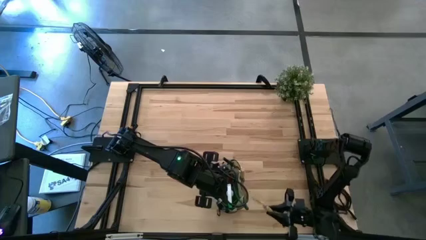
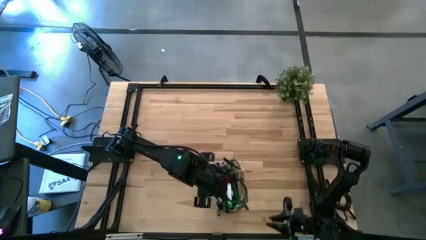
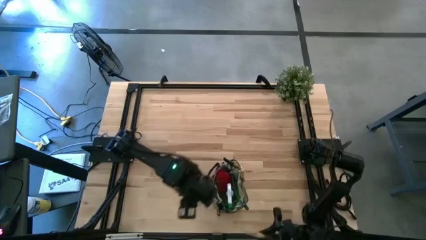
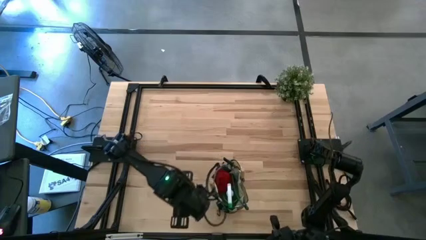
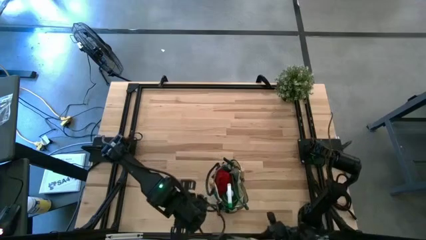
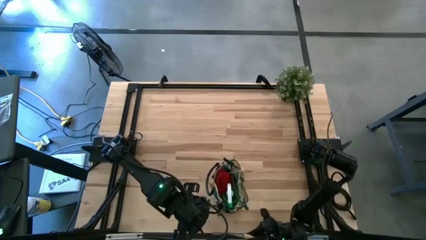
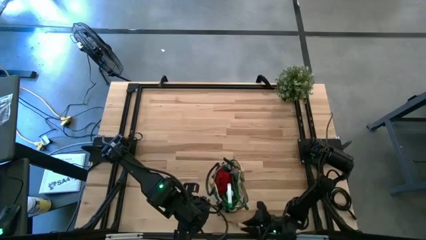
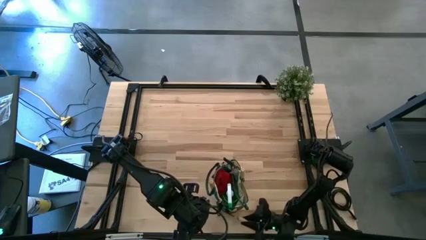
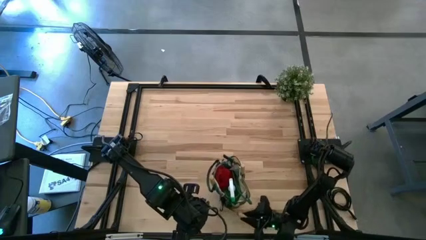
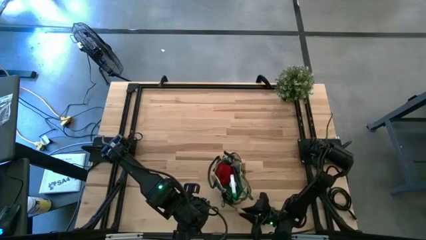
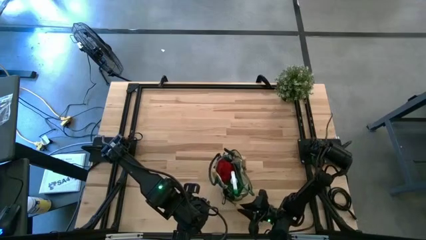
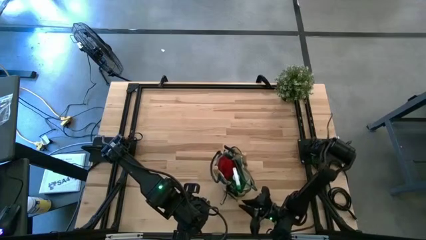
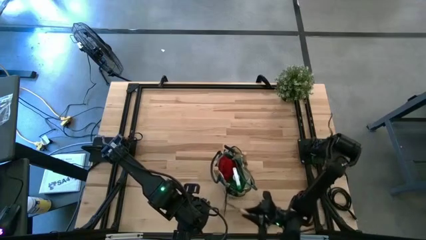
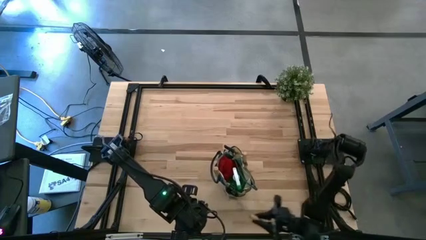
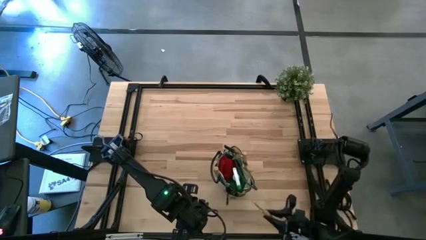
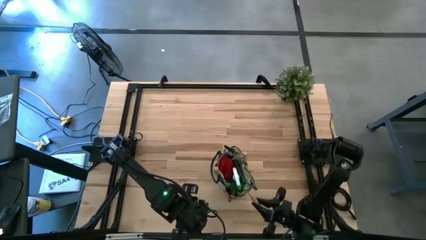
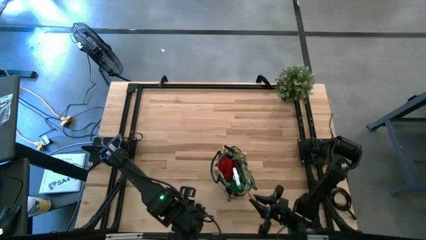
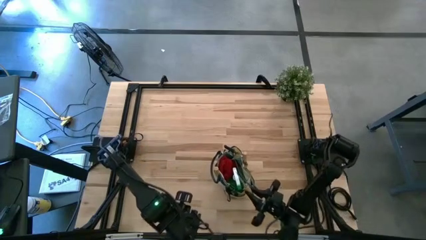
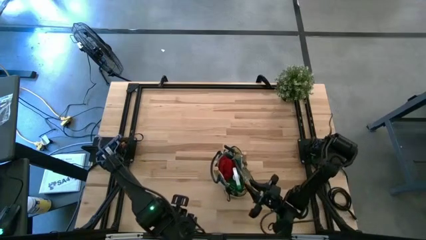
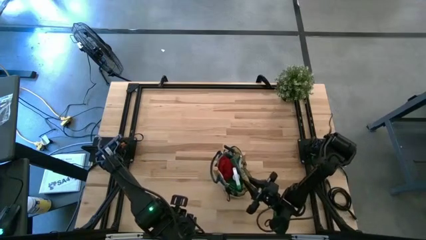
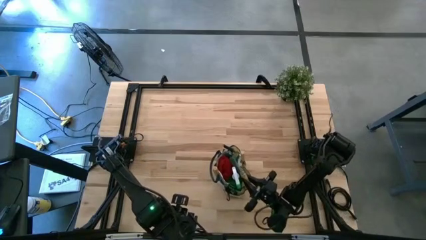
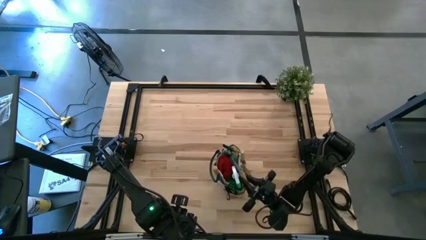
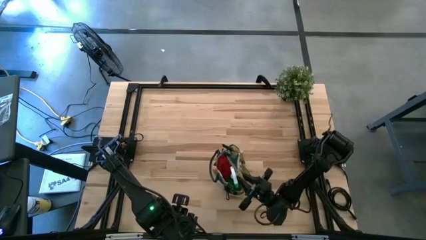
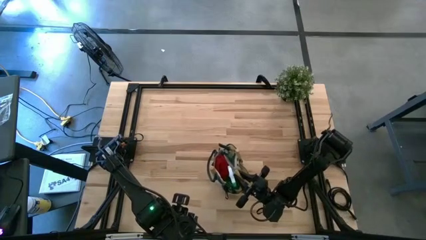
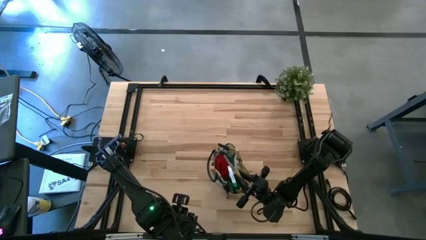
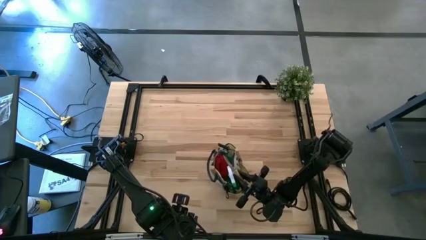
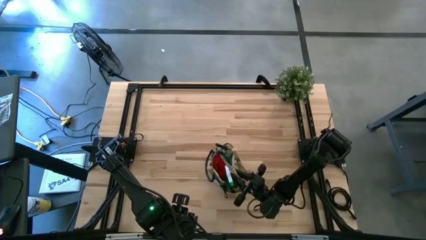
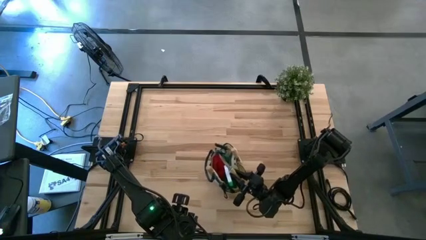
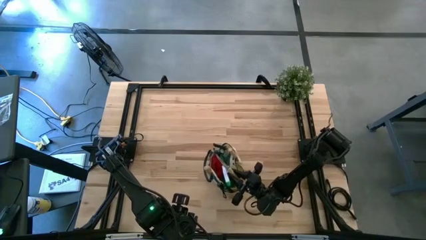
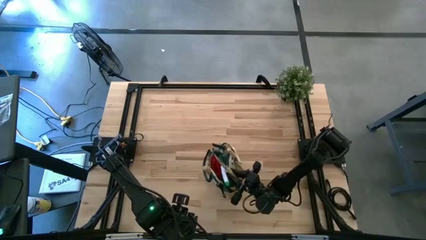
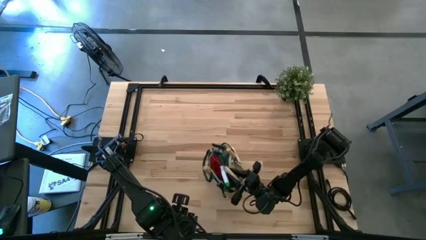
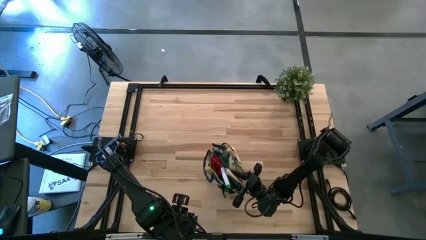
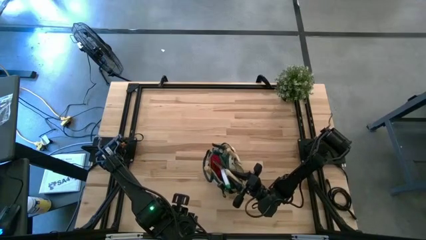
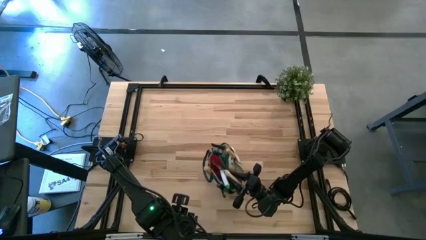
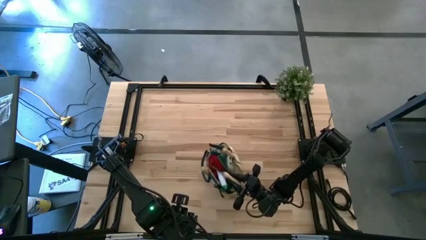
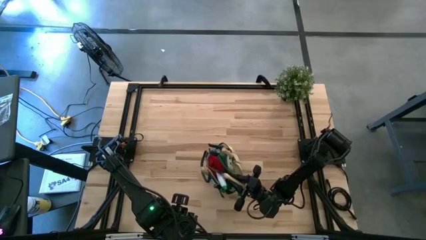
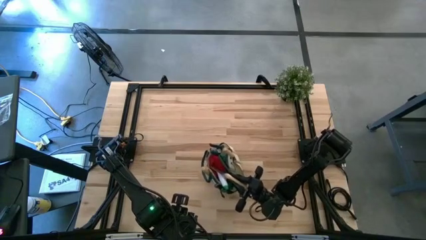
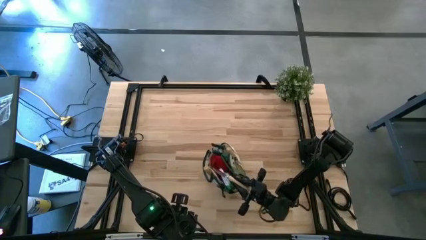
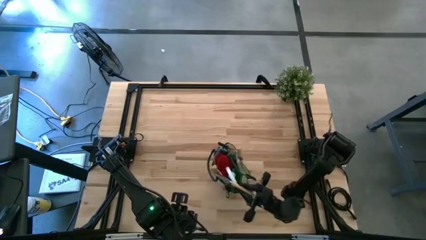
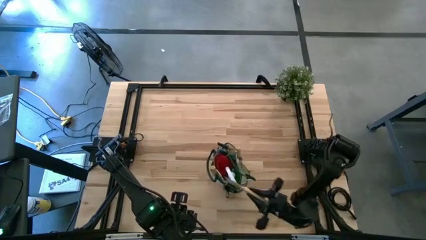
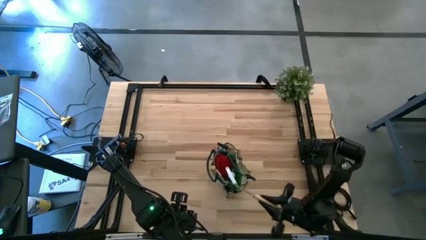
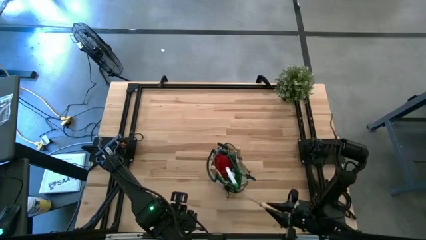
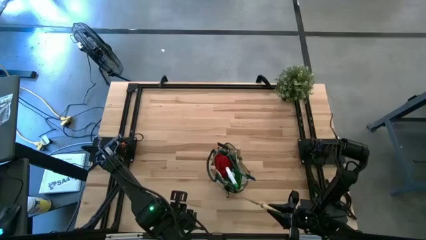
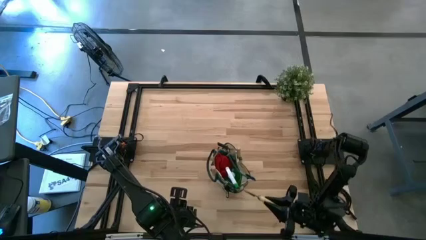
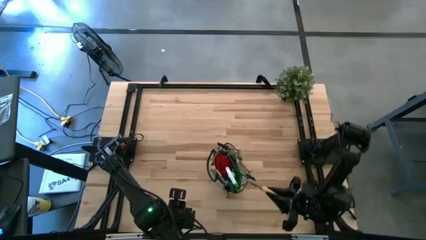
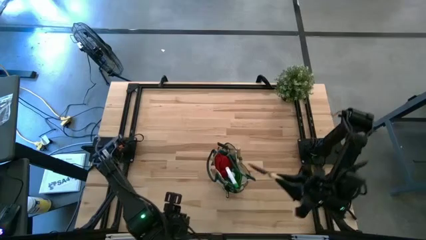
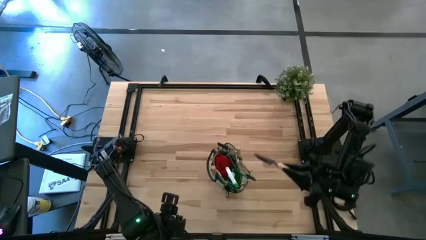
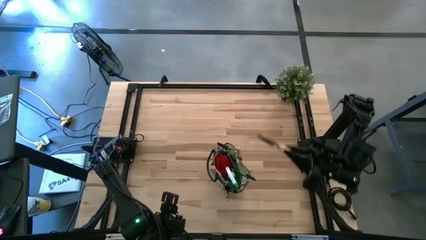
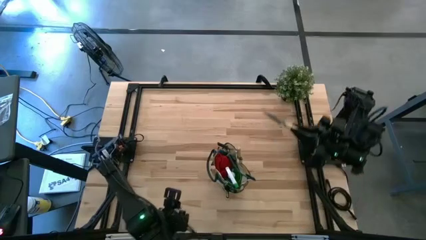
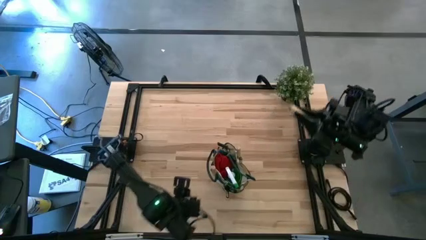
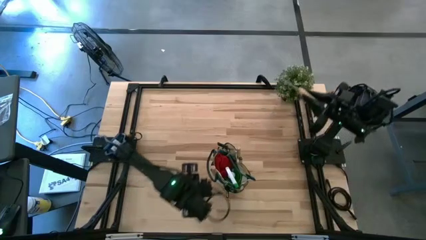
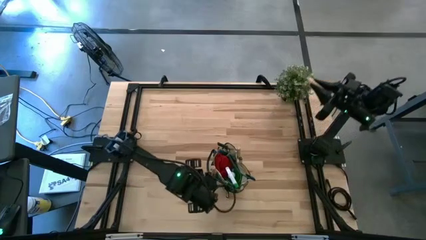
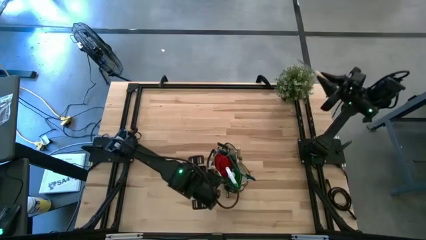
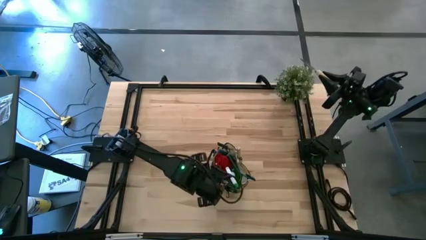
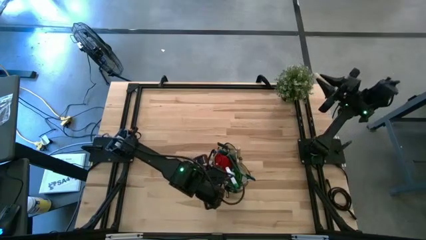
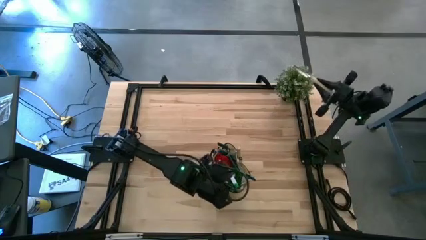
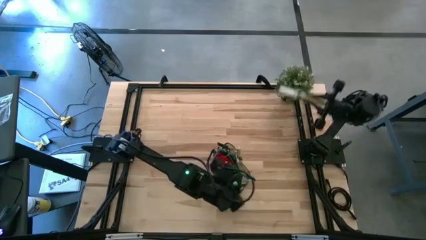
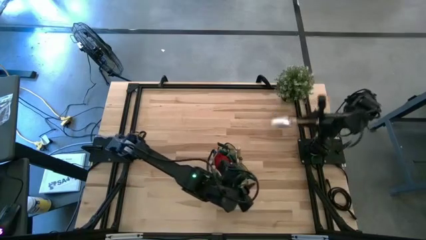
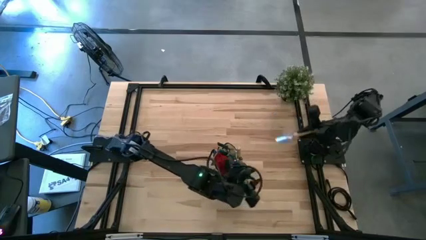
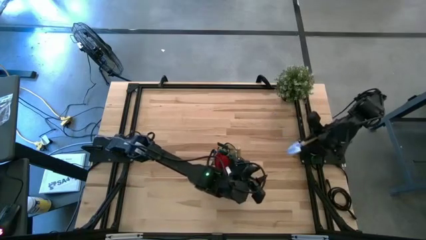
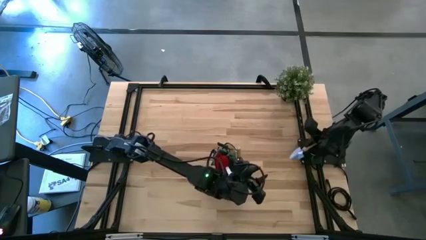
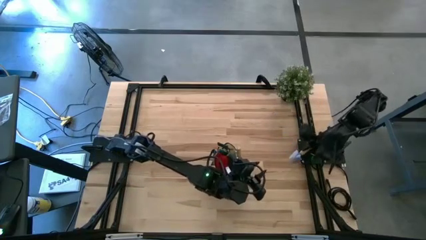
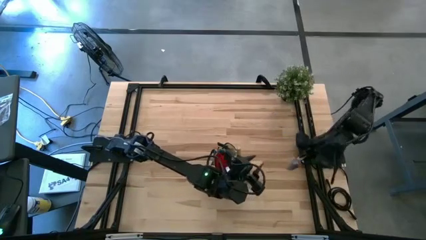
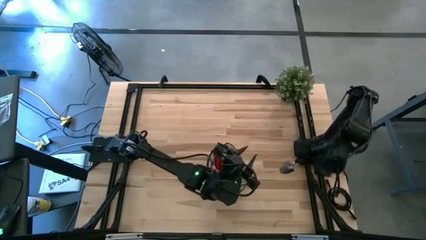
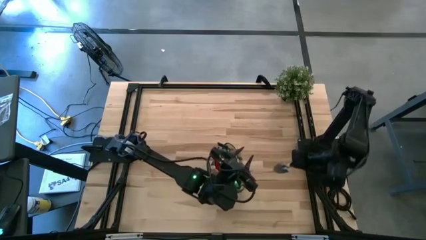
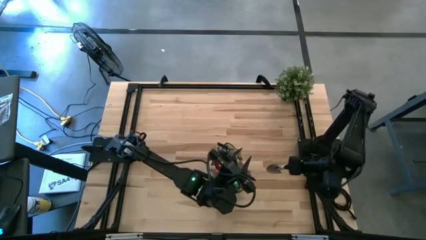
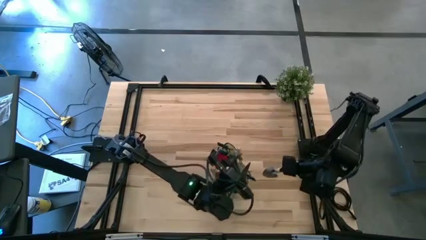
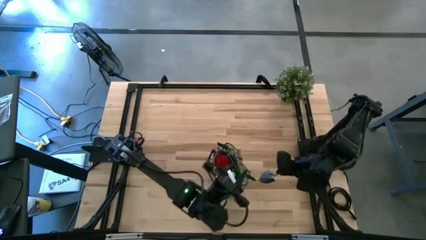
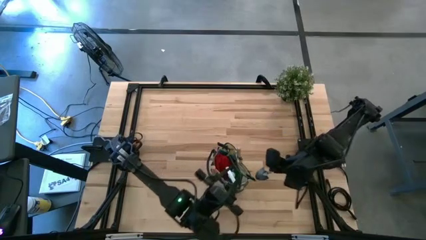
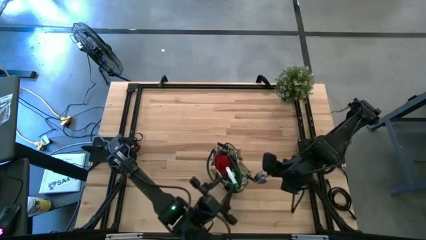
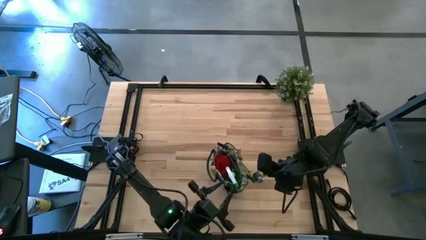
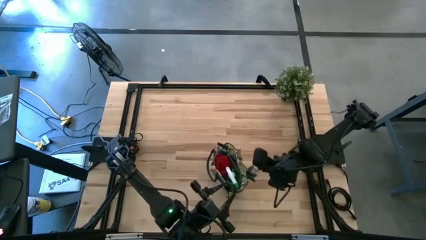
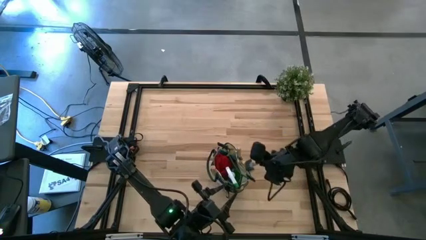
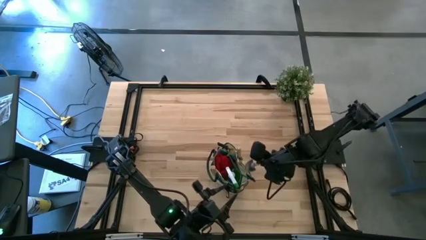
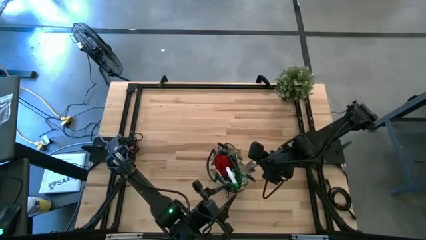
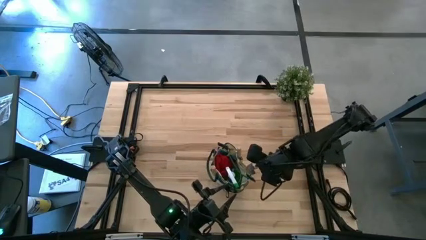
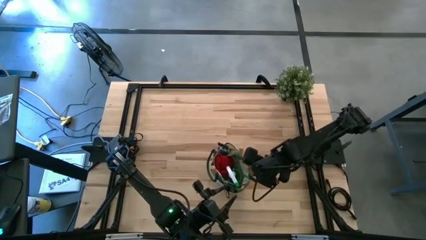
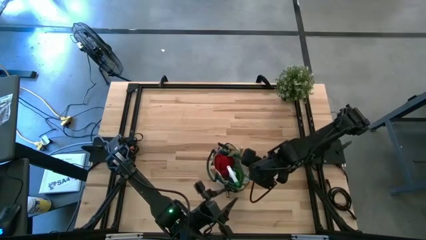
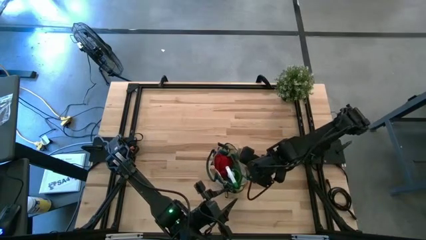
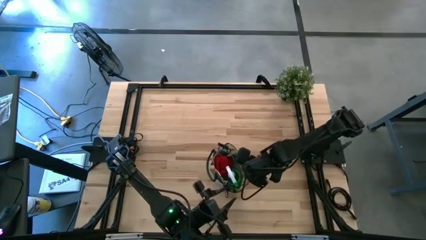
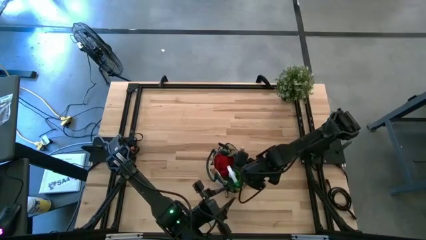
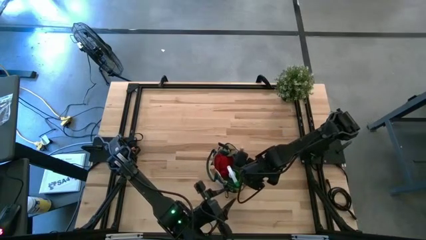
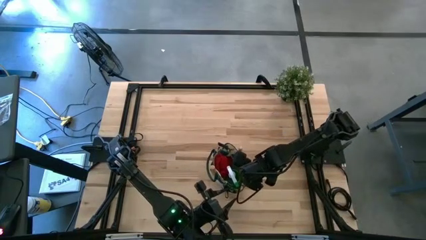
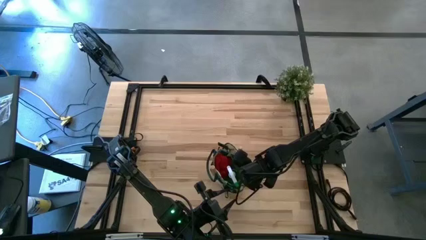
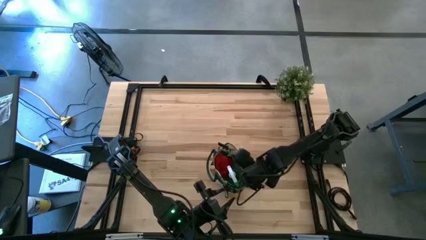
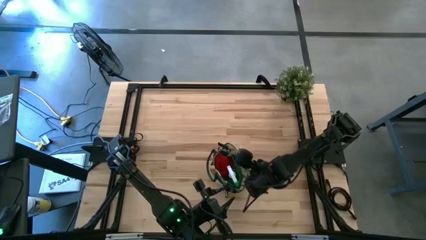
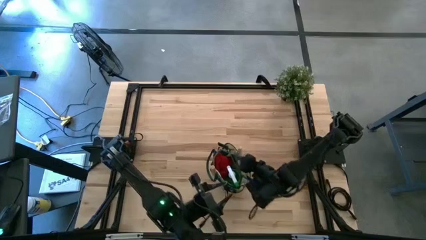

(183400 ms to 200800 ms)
Task: Pick & Place Garden tools in Gardening bag
Put the trowel into the gardening bag
